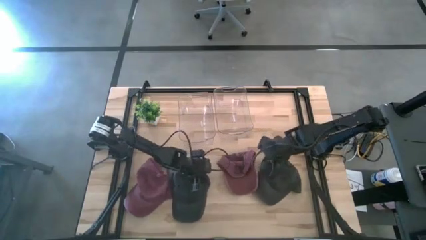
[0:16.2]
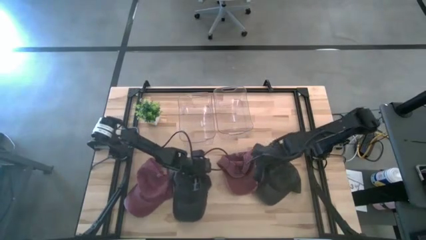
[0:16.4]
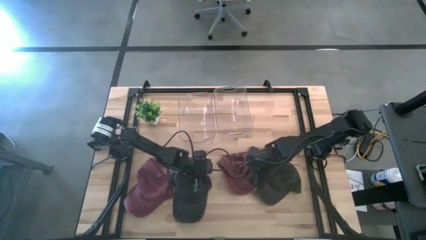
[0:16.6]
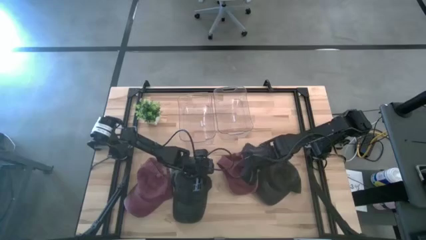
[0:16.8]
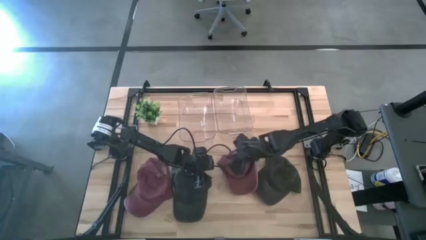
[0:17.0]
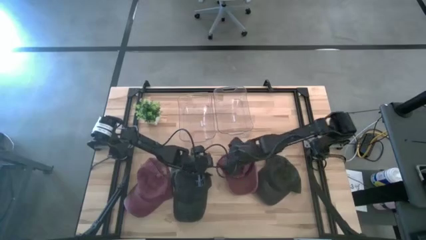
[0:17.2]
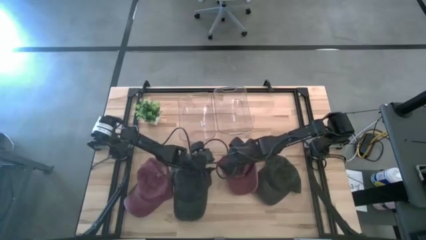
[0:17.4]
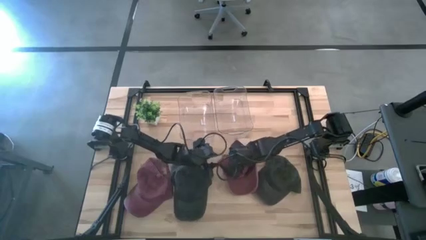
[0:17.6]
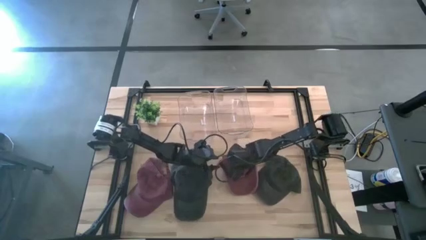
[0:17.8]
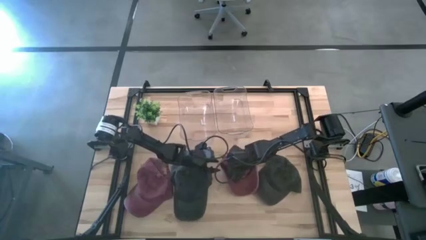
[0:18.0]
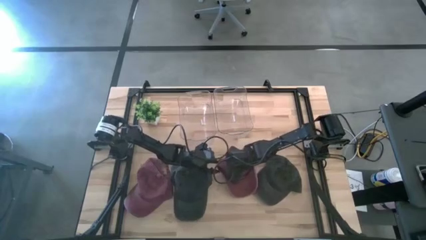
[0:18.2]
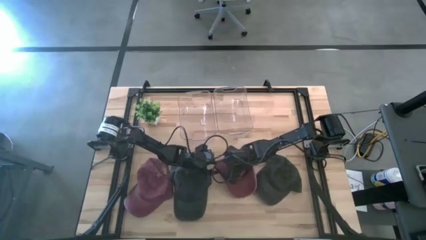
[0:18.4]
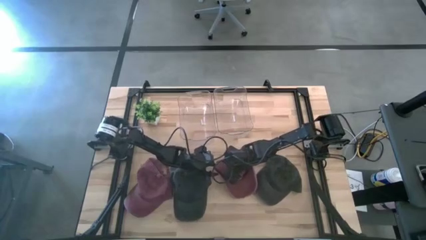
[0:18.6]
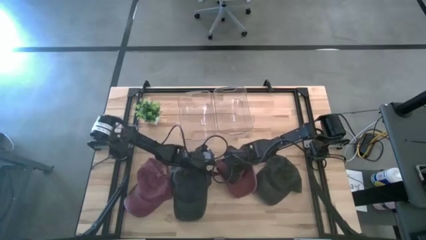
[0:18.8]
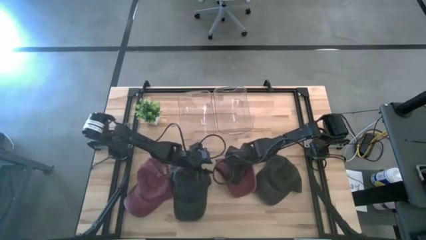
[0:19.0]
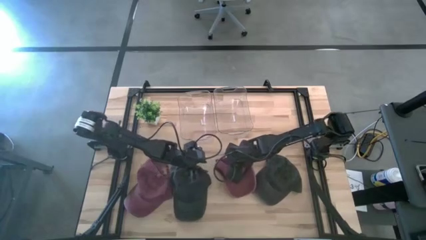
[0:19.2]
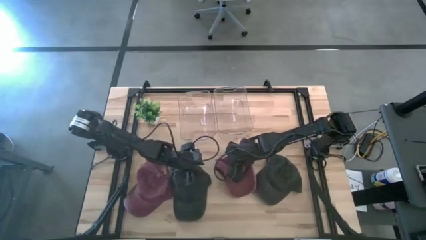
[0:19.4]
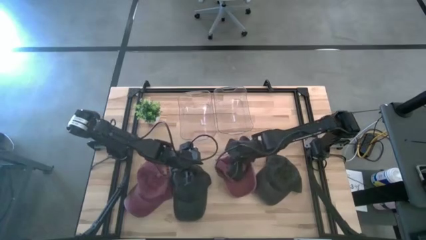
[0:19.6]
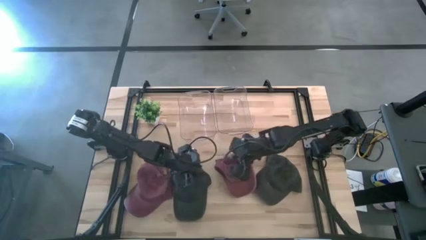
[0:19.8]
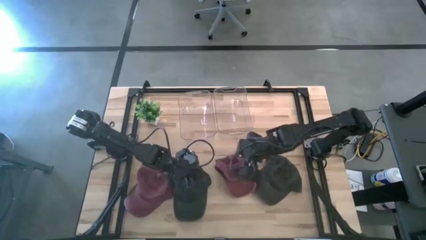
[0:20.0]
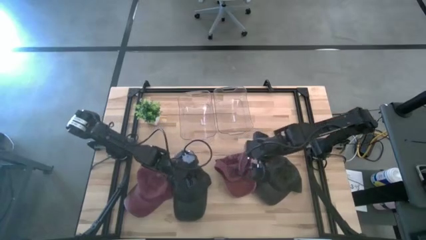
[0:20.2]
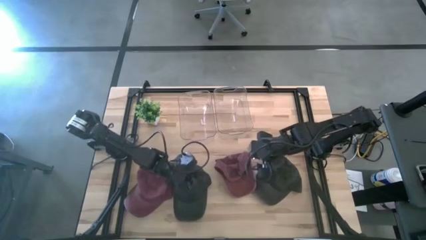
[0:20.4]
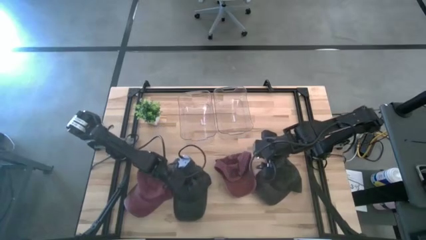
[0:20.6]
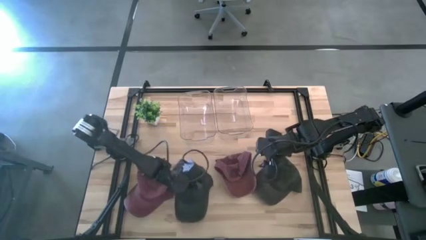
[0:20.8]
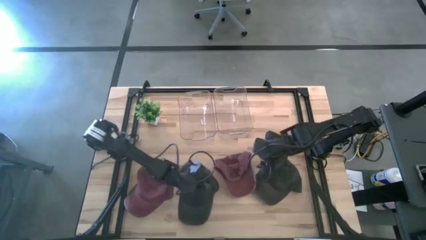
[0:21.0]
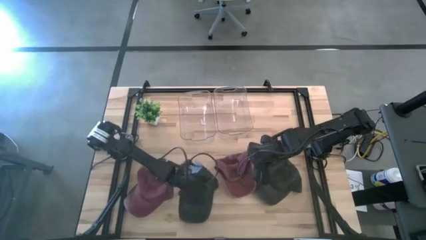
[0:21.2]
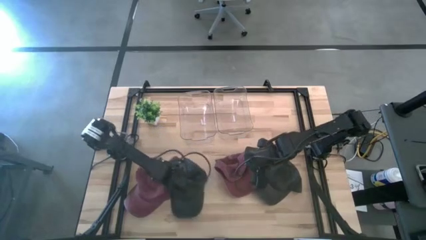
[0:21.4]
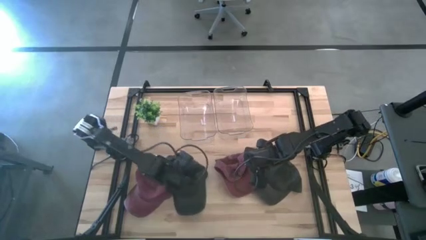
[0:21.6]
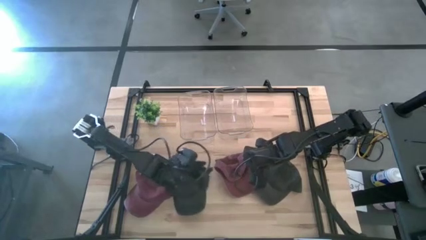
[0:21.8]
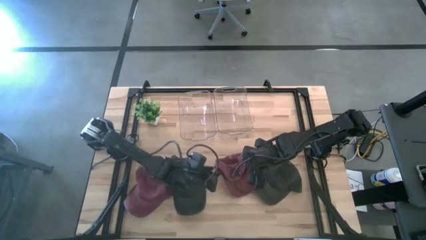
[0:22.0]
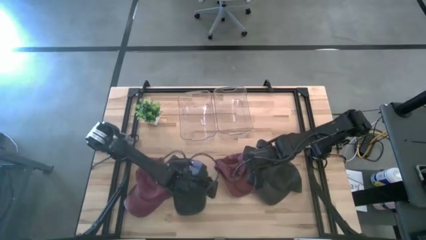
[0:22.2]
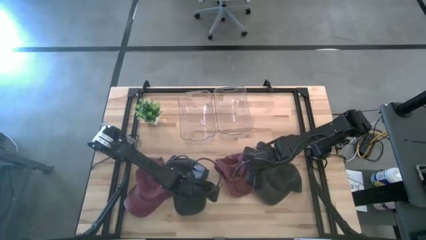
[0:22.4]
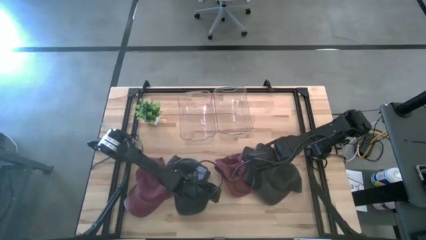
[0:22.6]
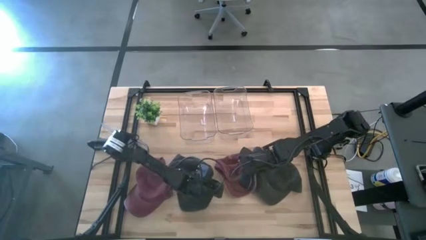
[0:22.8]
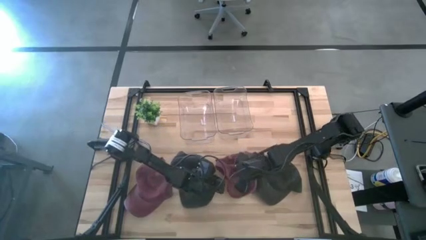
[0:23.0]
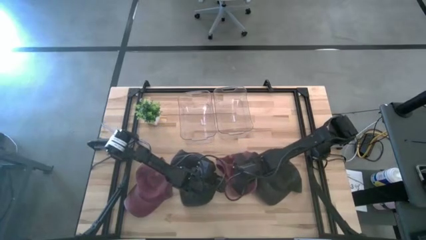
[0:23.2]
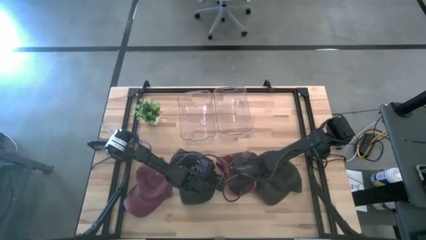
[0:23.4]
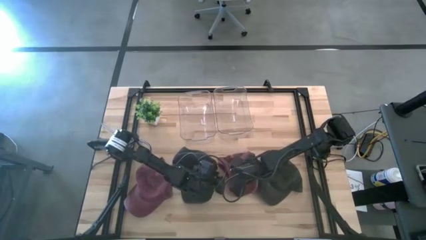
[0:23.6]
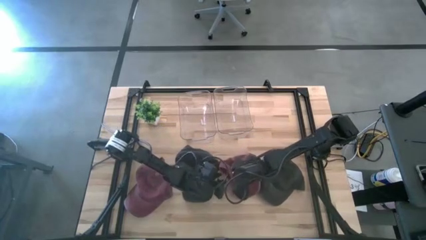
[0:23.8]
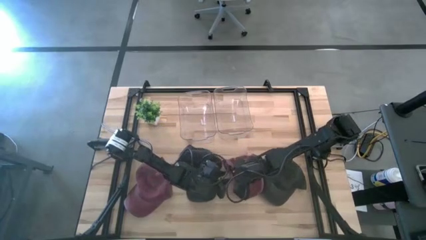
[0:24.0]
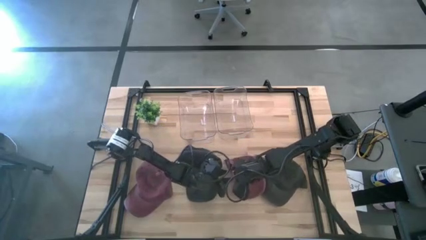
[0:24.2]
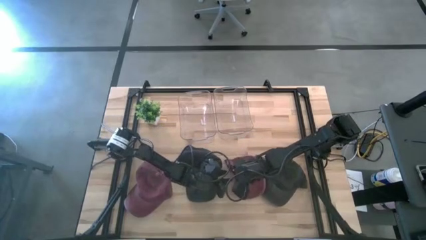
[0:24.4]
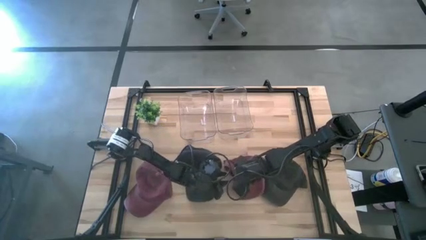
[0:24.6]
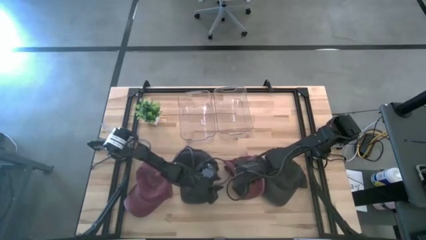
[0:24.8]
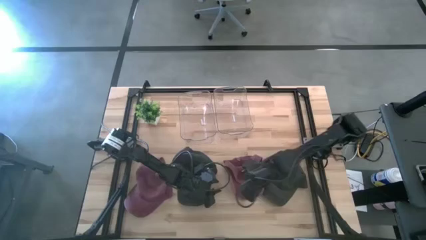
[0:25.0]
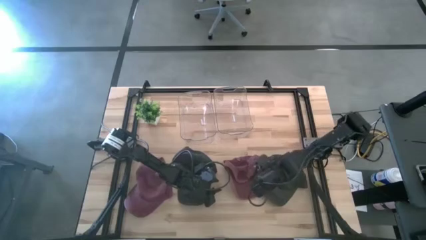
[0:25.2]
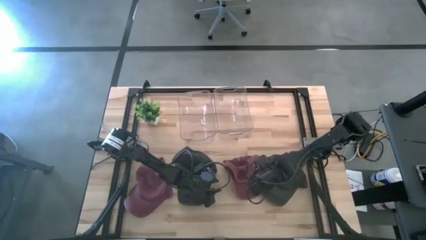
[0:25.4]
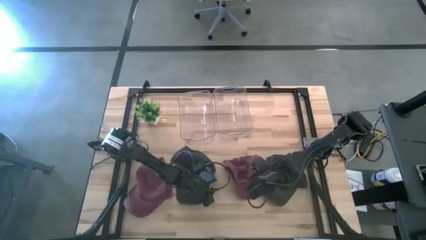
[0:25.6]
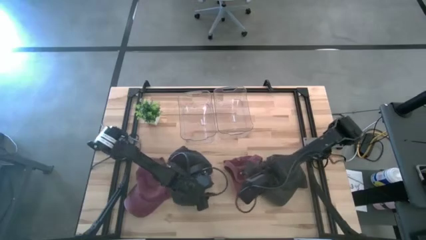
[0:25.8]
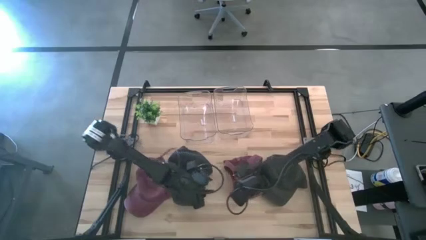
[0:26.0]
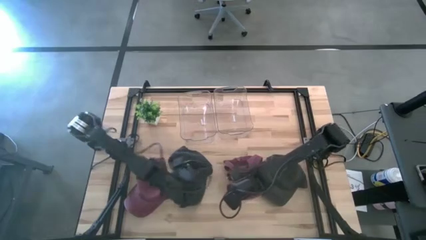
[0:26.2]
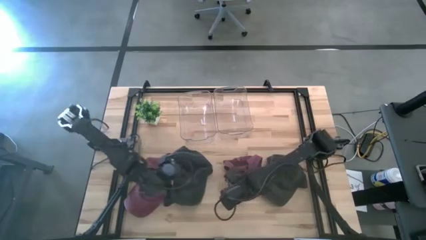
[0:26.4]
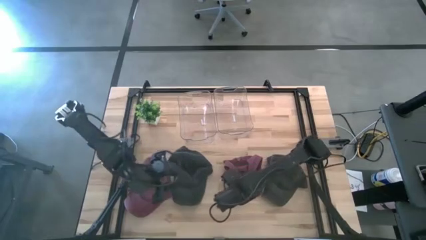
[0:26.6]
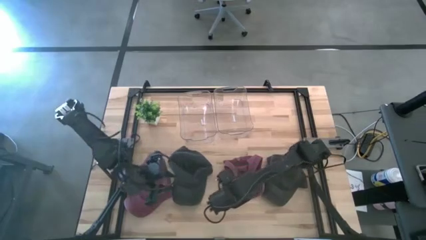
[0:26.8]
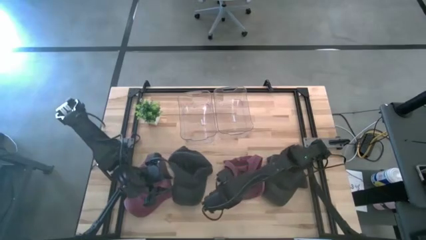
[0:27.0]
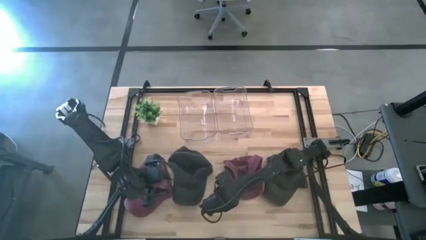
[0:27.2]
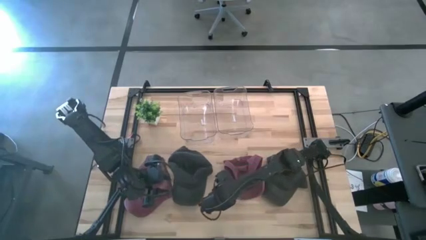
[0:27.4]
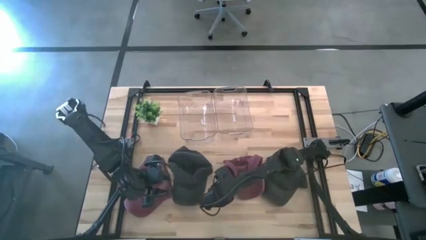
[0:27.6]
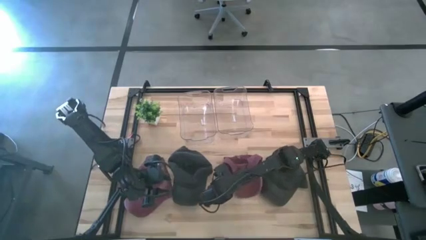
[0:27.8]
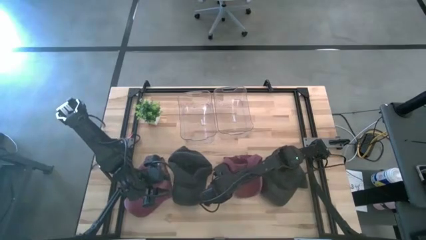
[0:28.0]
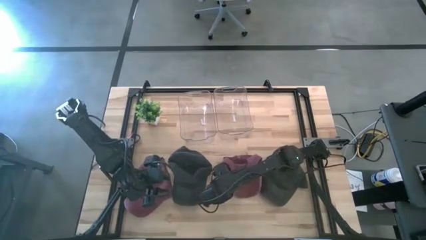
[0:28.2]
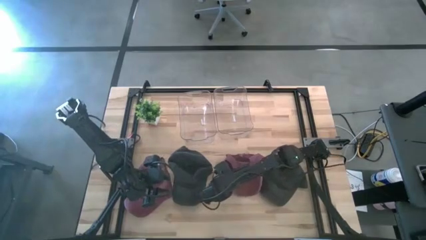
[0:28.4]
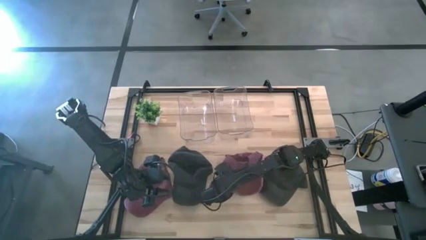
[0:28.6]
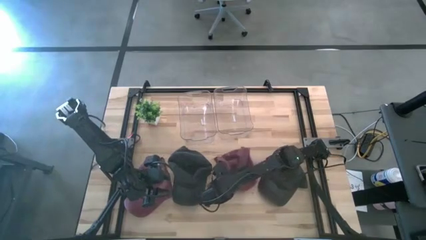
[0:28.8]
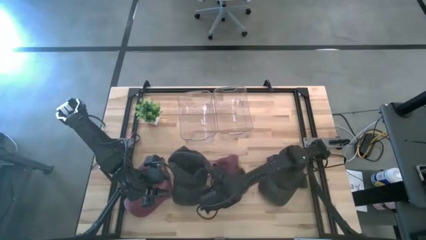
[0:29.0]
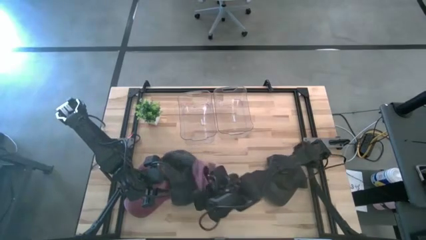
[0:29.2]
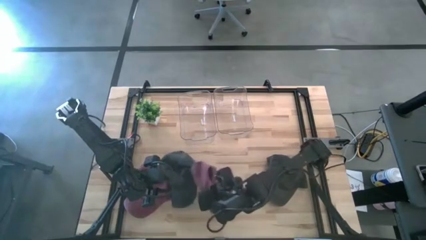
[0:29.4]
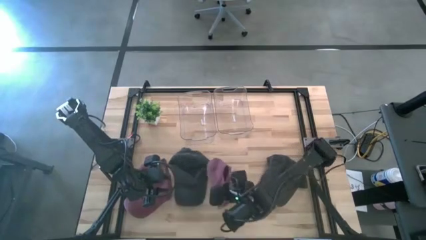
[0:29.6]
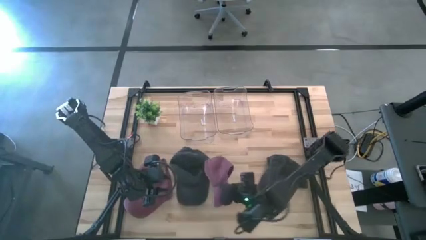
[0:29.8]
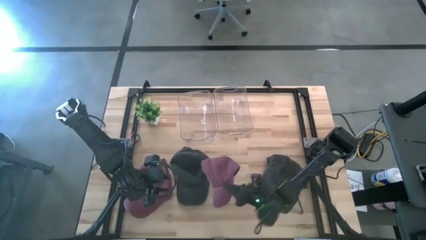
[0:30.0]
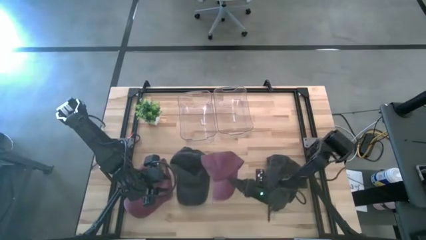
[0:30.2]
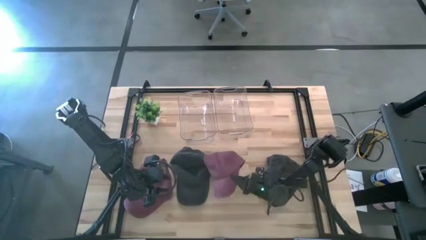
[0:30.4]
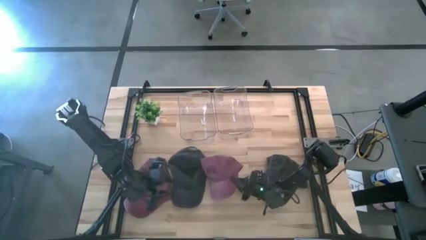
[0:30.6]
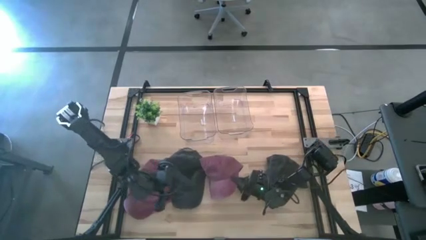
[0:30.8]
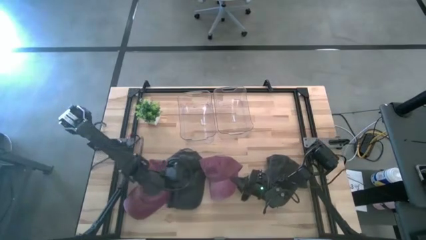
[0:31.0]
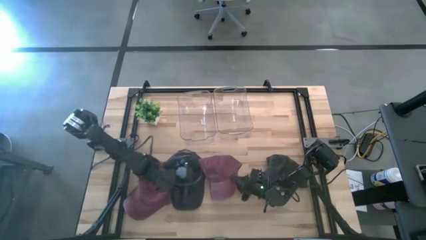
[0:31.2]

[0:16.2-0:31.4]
Task: Pick & Place hat
Put the right red cap into the right transparent bin

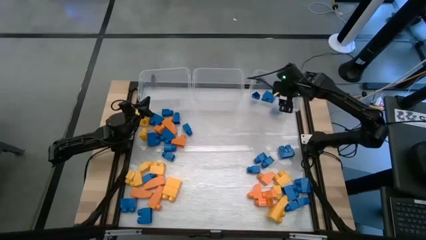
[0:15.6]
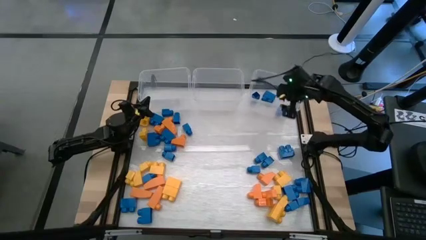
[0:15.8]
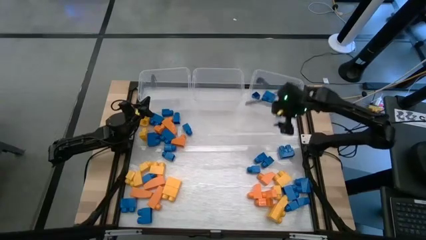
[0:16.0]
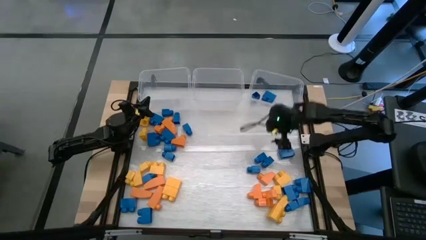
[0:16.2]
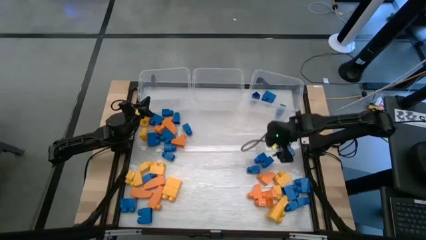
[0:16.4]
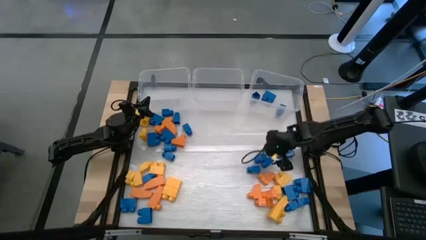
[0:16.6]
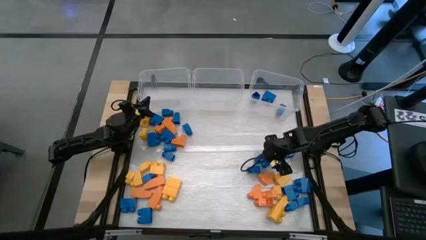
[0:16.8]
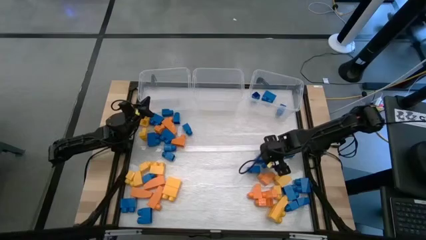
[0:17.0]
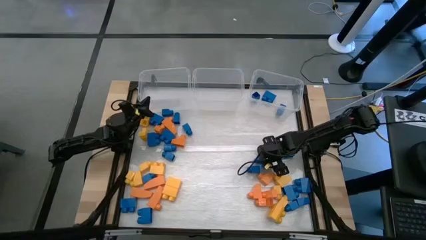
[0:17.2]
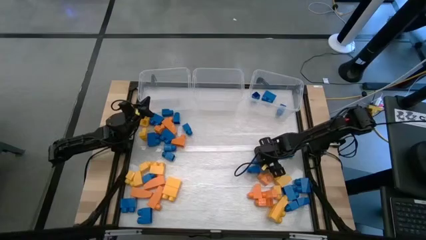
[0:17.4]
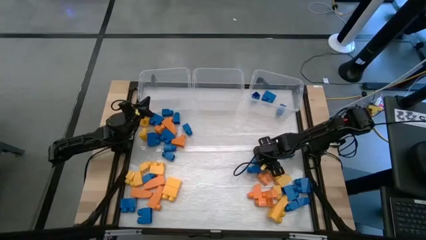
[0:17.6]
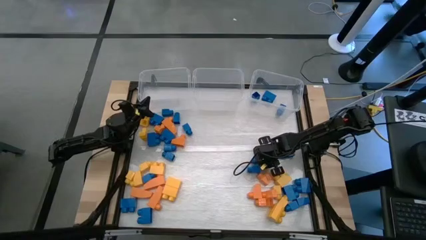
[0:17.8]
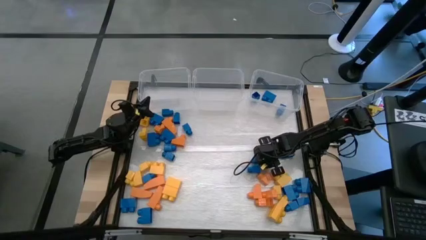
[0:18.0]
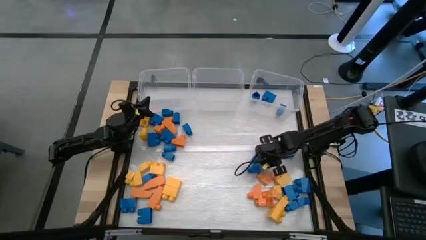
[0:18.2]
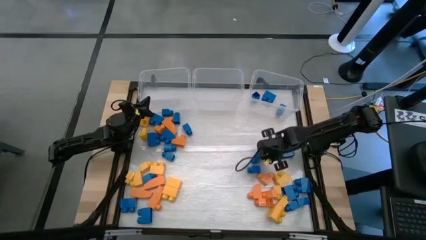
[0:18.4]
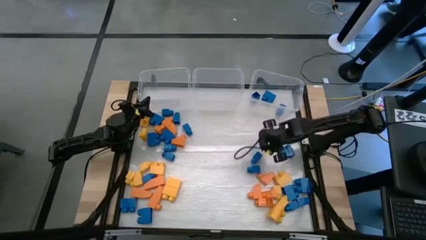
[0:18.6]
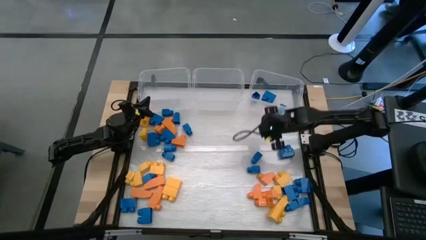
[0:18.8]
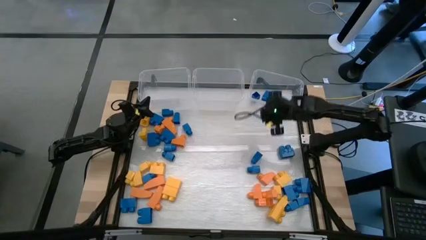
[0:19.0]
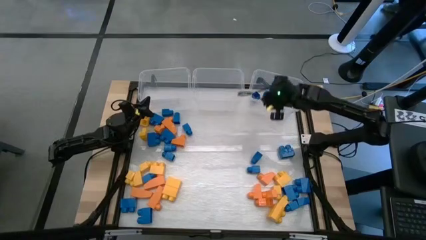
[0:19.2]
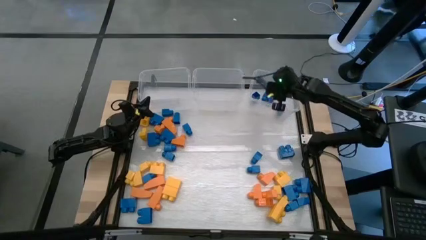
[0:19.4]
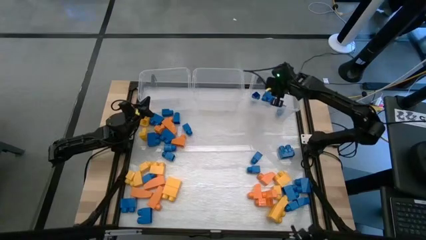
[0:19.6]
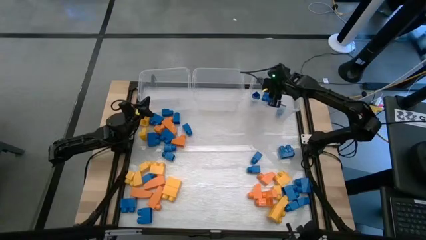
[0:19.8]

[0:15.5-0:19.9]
Task: Sort blocks
Put the blue game piece into the right transparent bin
